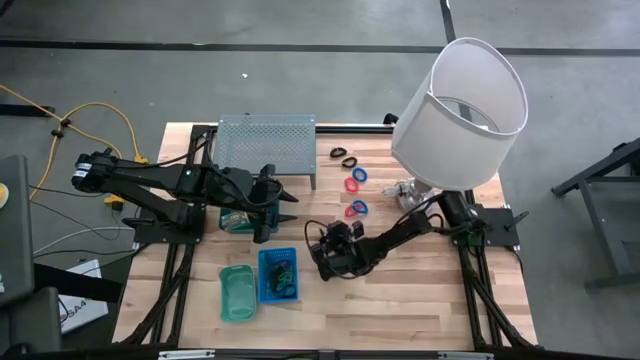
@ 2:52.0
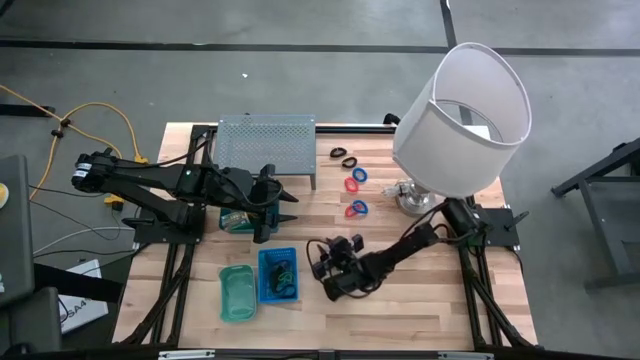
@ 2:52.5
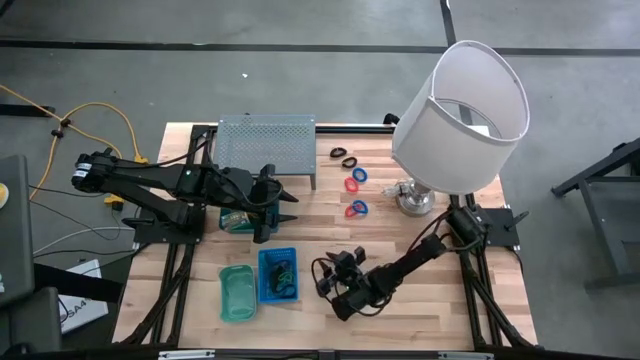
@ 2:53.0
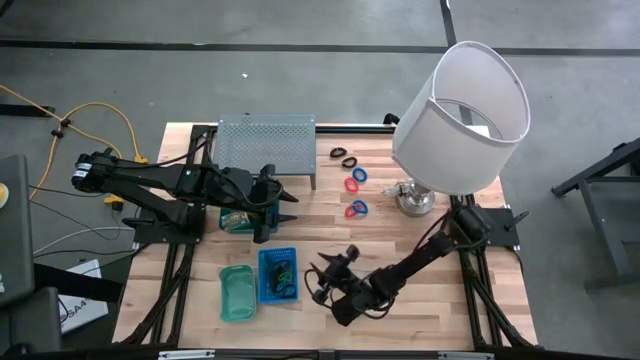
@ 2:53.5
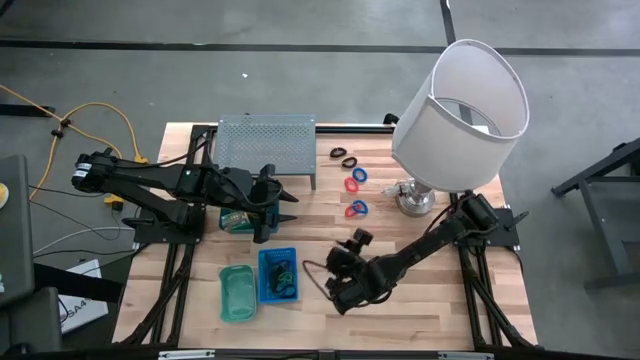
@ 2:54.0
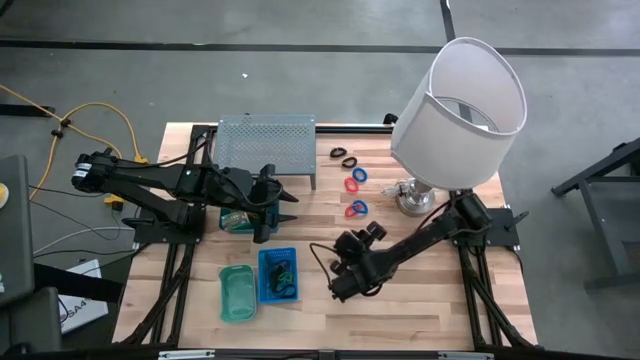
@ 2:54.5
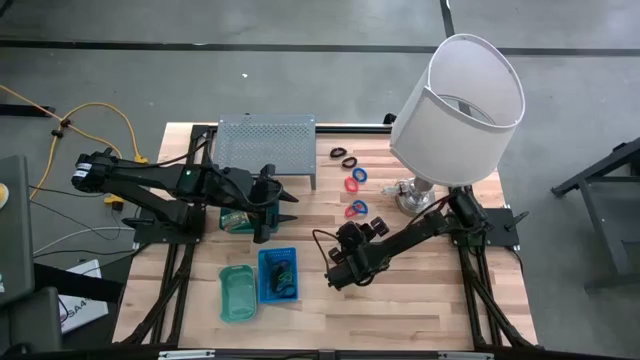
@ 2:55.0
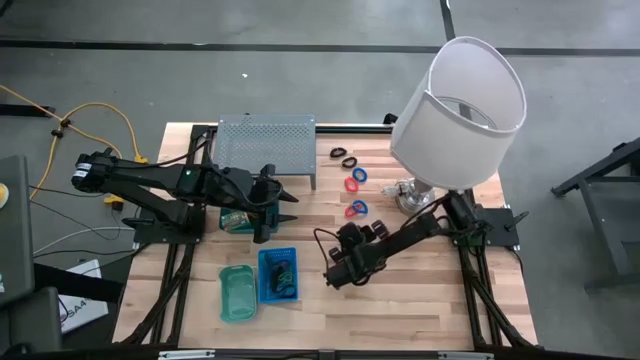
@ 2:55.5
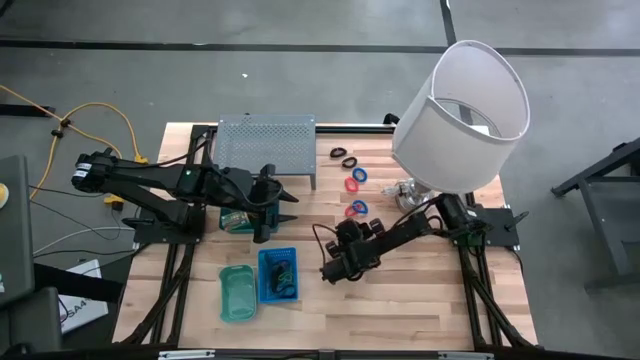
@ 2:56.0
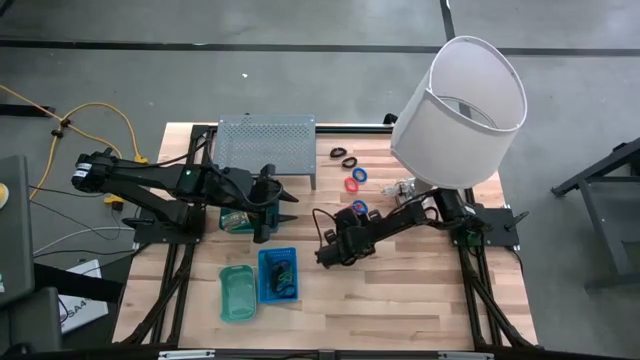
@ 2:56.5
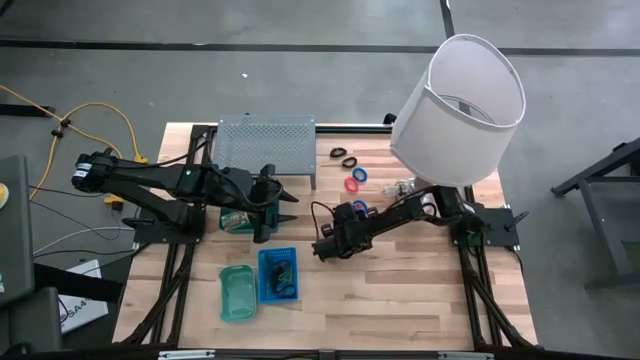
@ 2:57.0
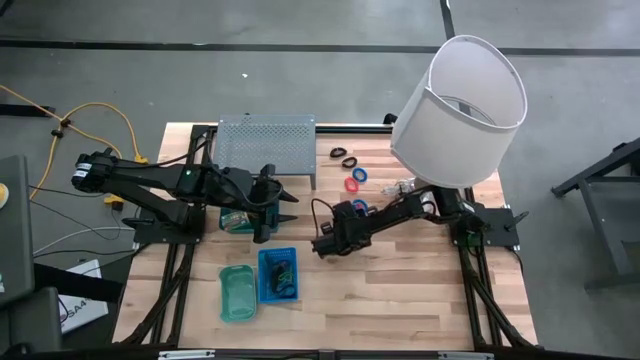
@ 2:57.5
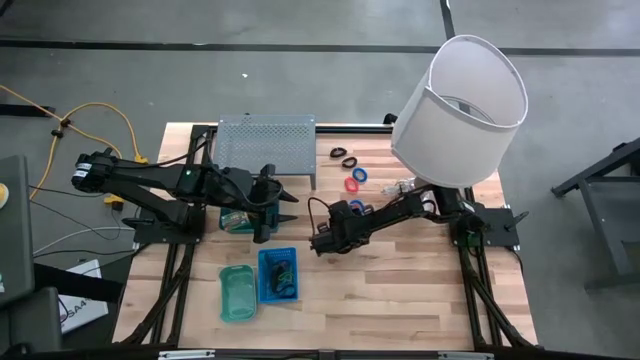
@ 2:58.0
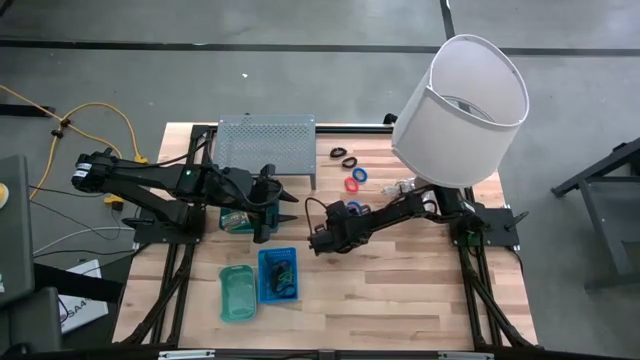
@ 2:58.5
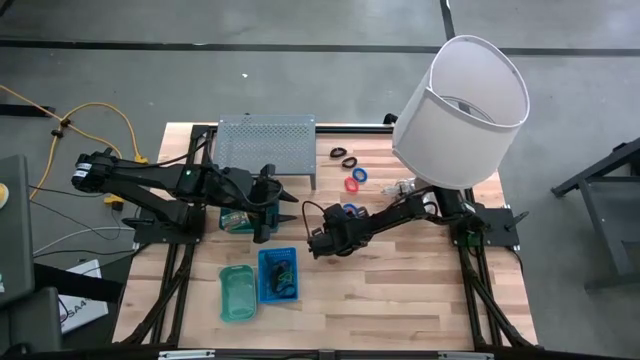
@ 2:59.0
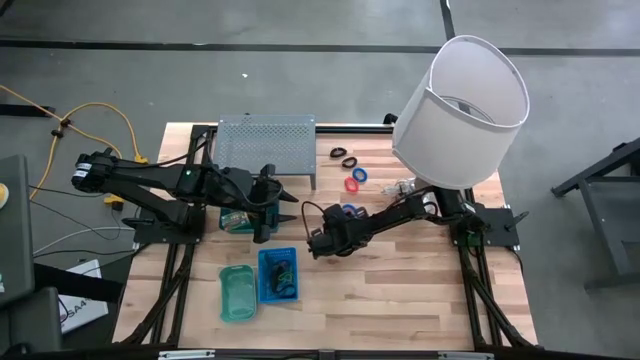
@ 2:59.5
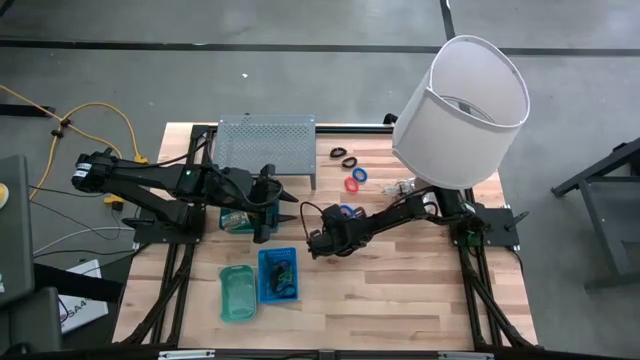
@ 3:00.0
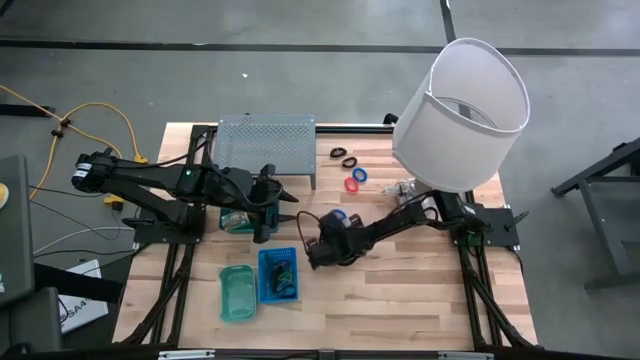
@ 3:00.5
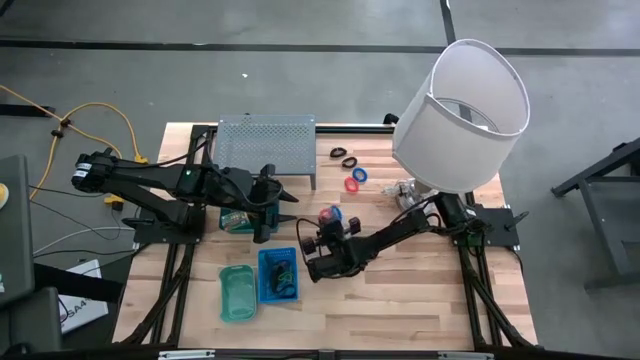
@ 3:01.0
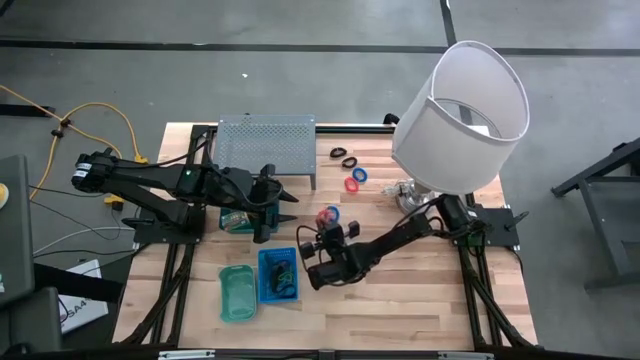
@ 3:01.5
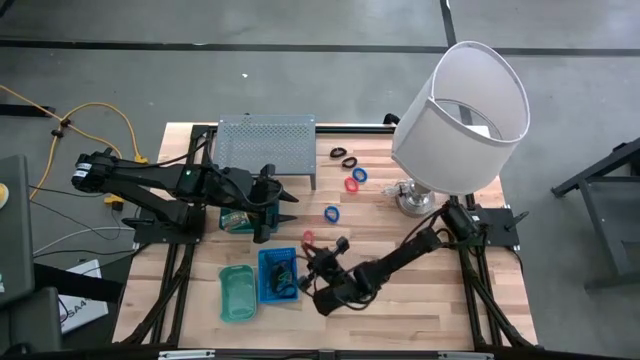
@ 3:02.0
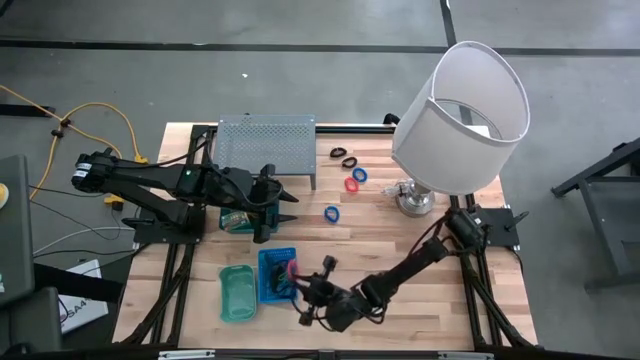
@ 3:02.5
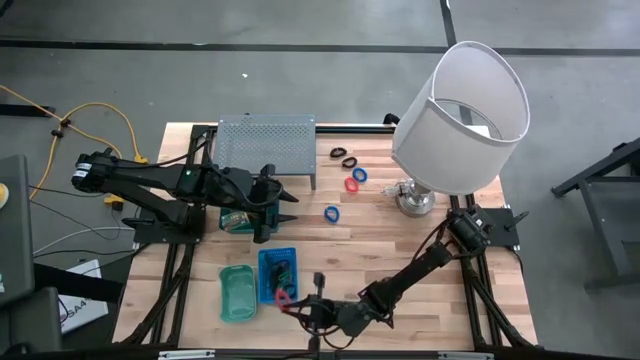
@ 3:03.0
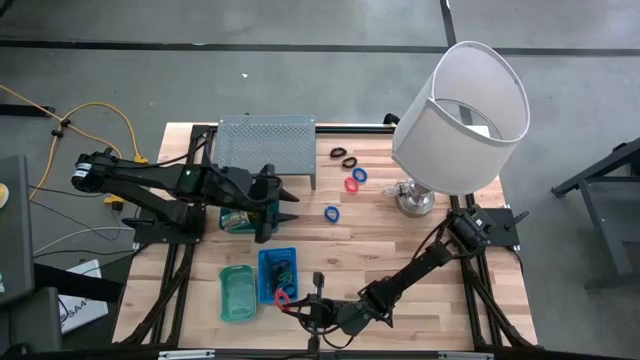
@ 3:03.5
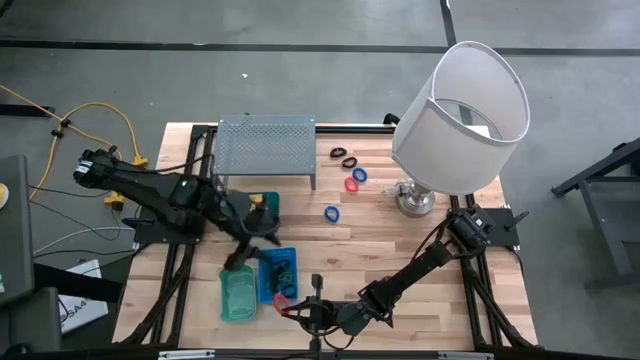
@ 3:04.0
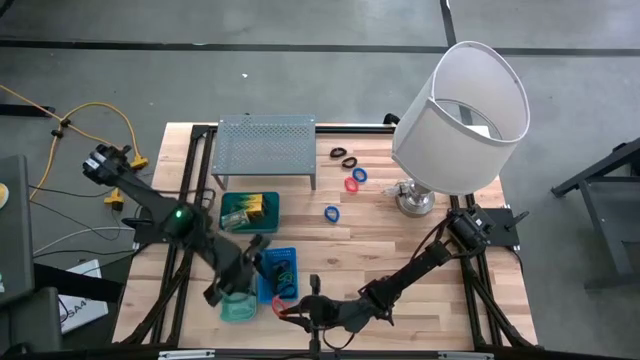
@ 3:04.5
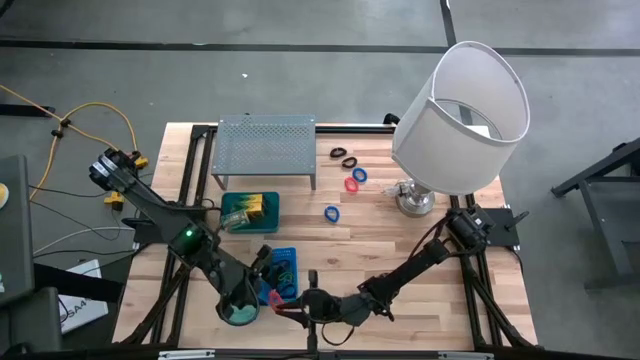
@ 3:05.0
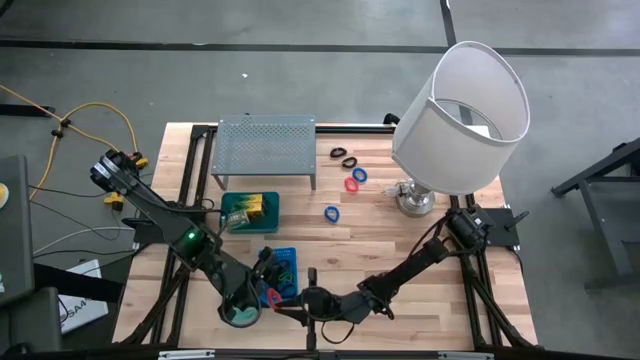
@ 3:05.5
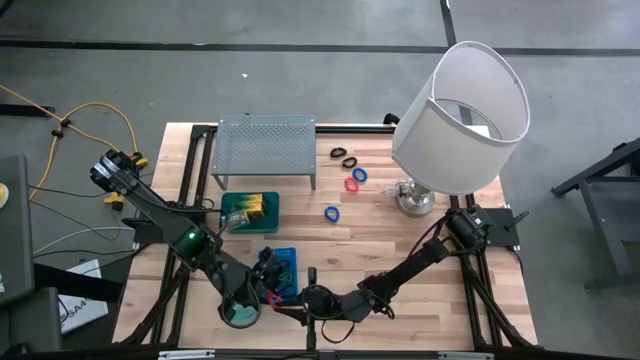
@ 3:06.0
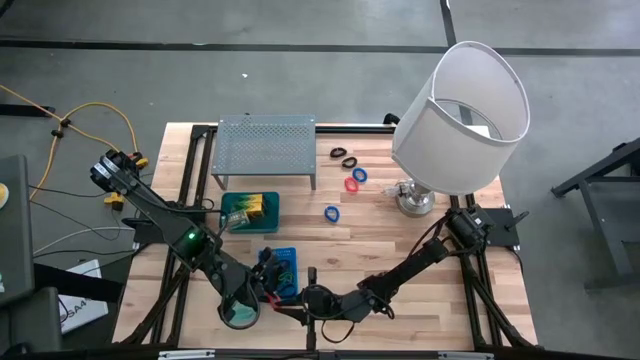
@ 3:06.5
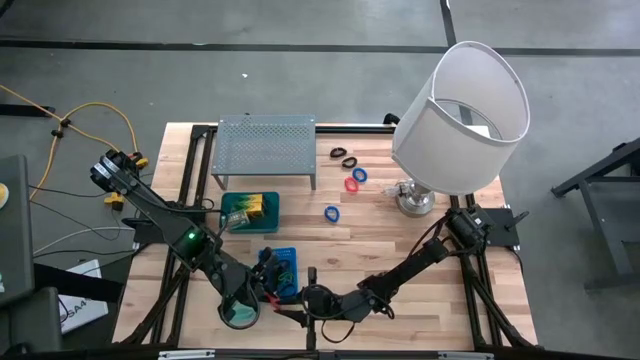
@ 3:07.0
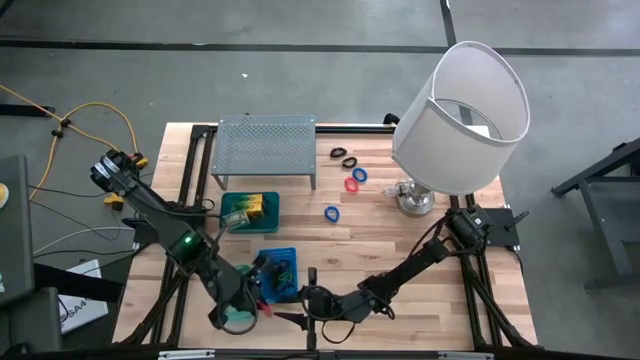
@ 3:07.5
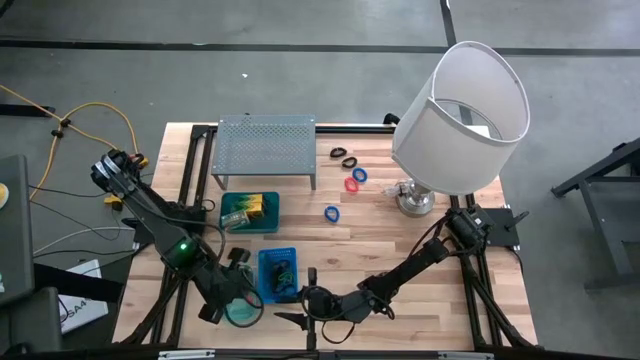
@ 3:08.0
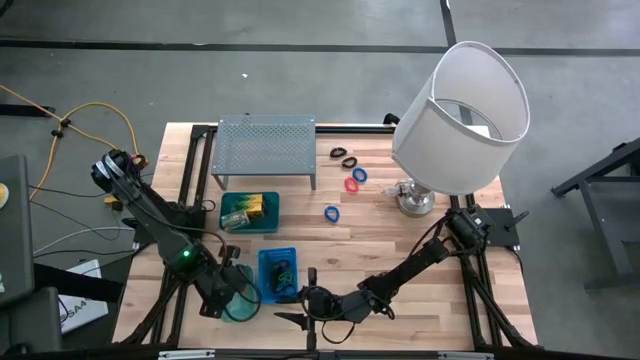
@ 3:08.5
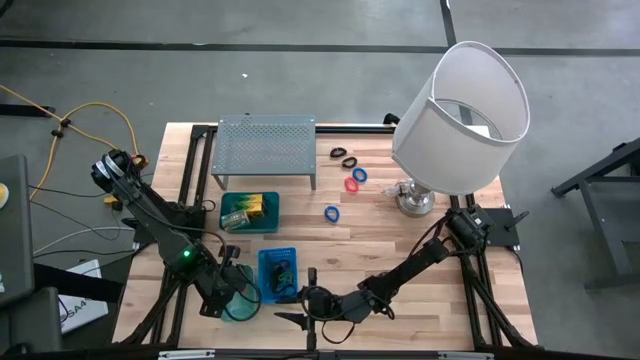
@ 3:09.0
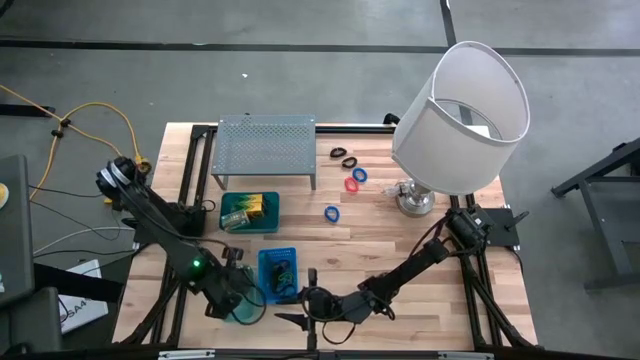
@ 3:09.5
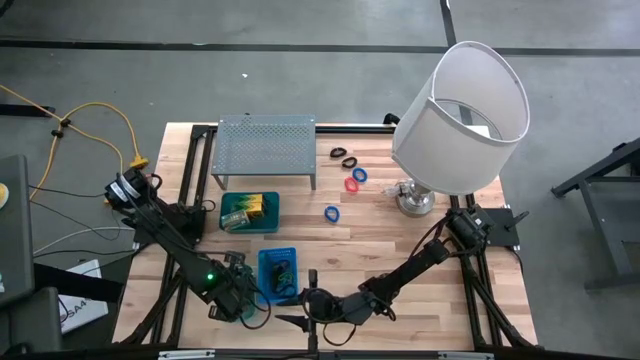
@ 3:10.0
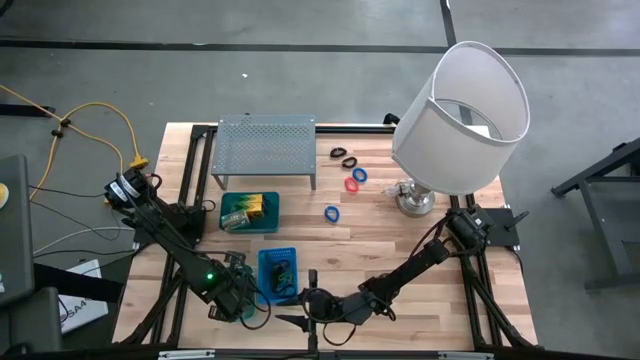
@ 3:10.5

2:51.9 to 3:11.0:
Task: Pick & Place Office Desk Supplies
Put the bottom orange spring keychain into the green bin

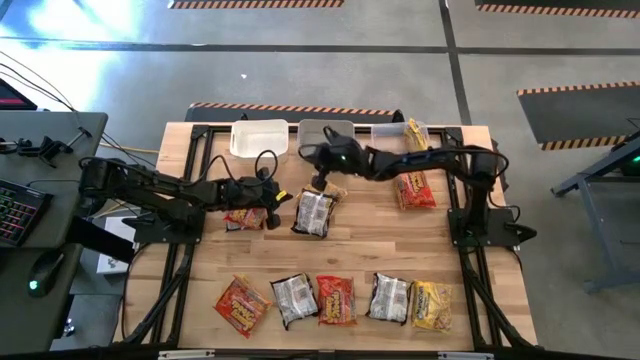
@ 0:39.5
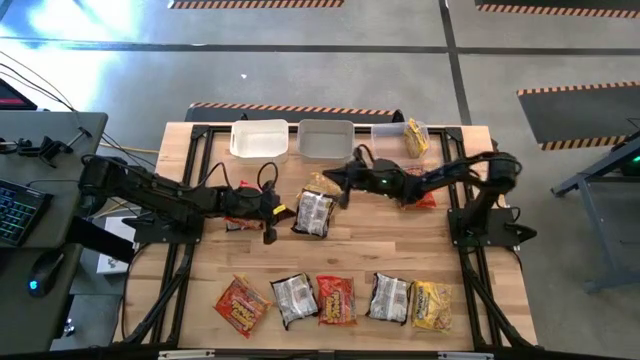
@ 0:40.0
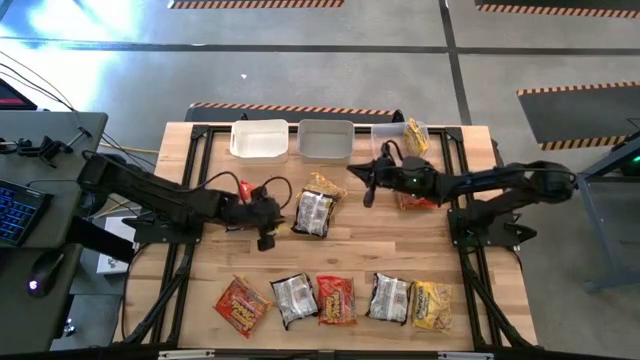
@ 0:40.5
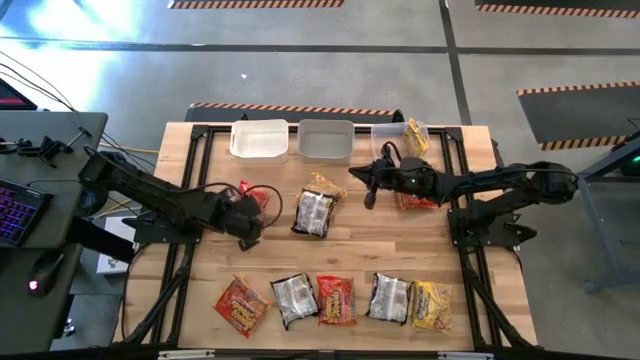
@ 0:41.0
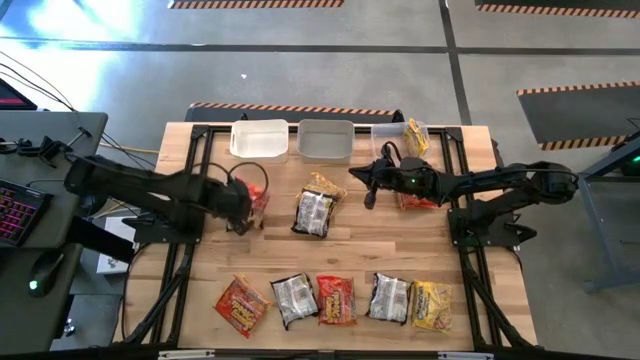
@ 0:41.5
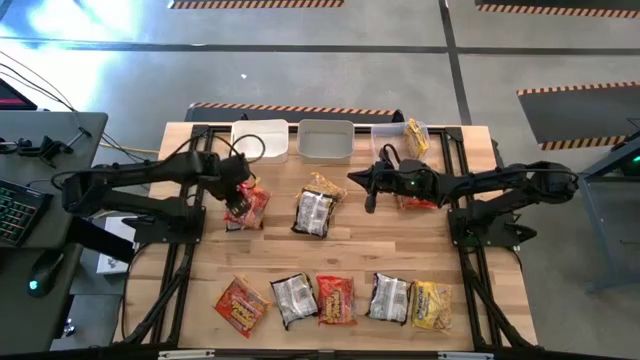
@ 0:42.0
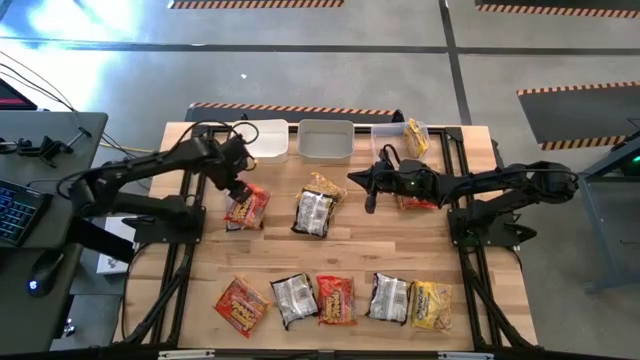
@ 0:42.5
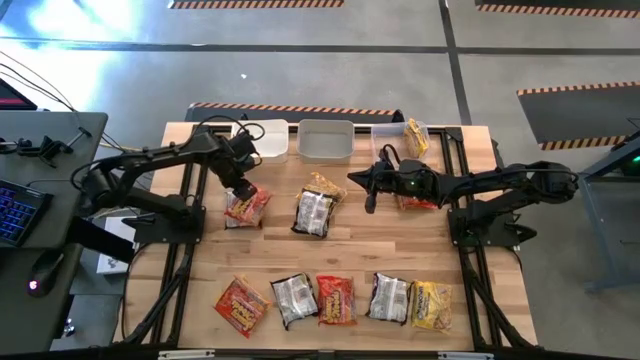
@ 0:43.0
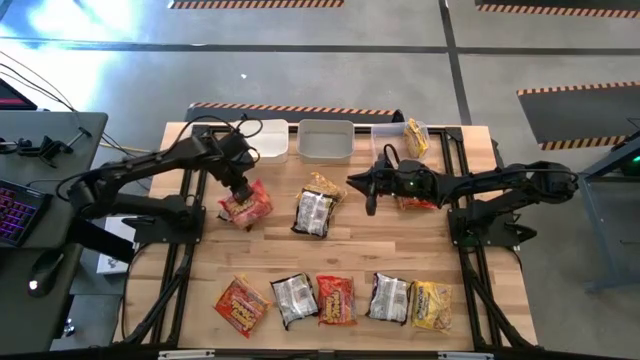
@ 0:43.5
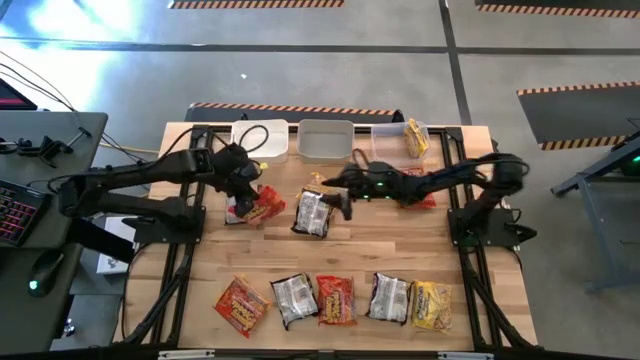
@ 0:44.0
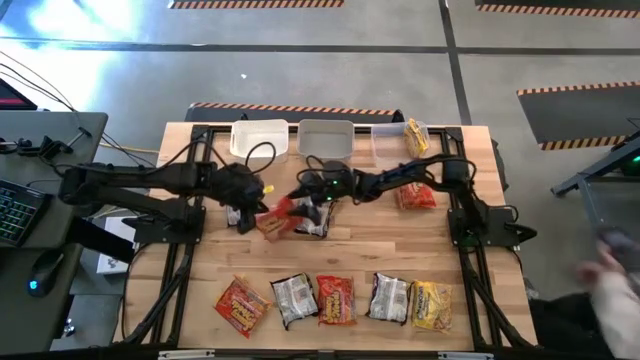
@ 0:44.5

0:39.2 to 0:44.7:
Task: Sort Maruchan noodles
Put the orange noodle pack into the white bin
